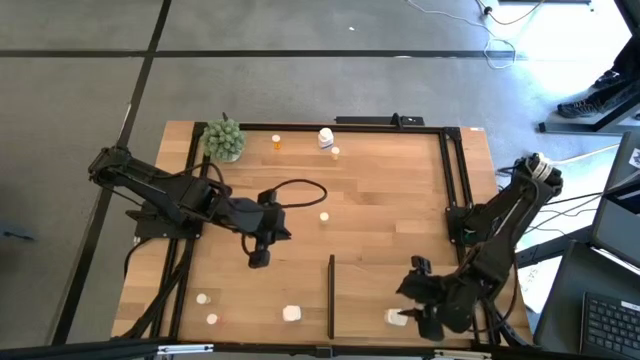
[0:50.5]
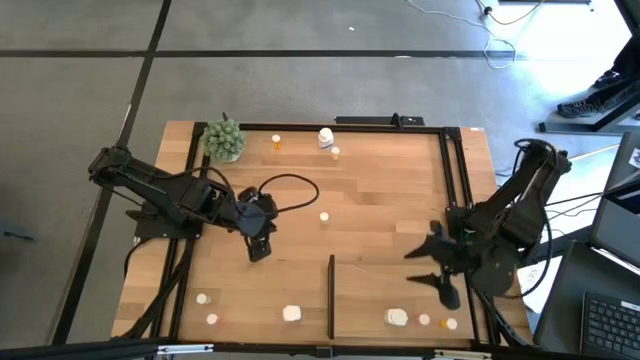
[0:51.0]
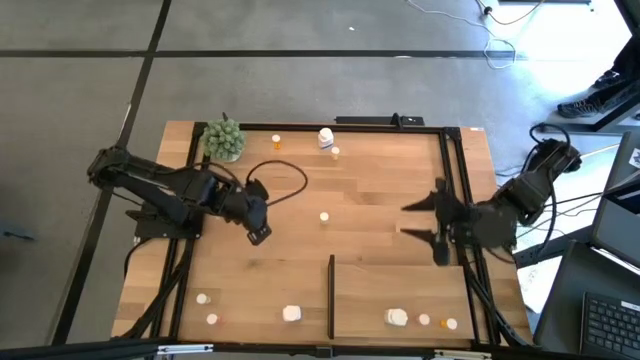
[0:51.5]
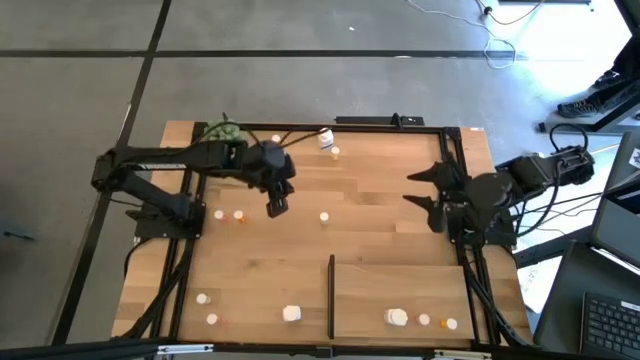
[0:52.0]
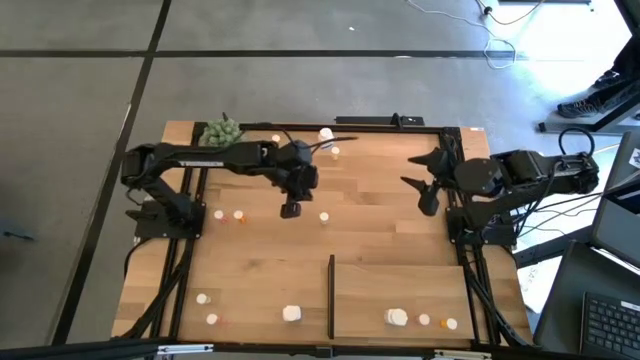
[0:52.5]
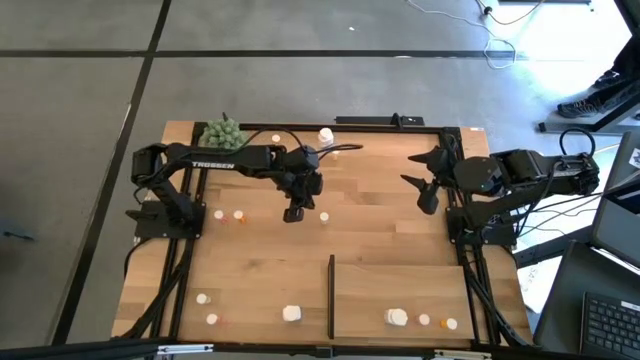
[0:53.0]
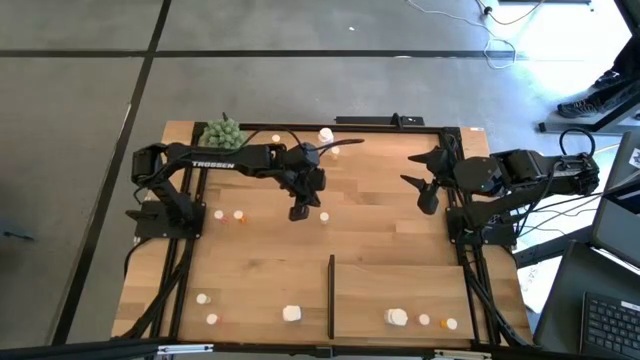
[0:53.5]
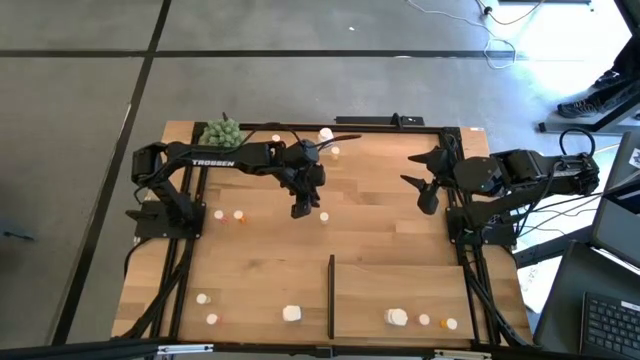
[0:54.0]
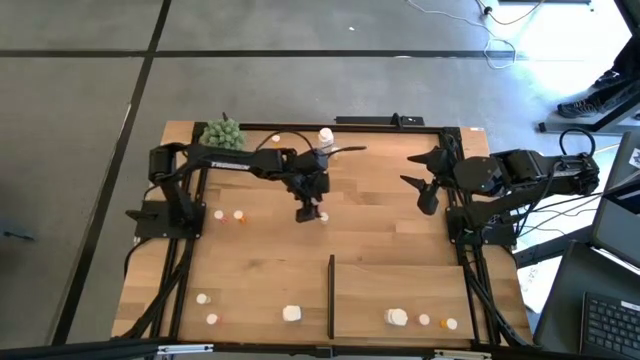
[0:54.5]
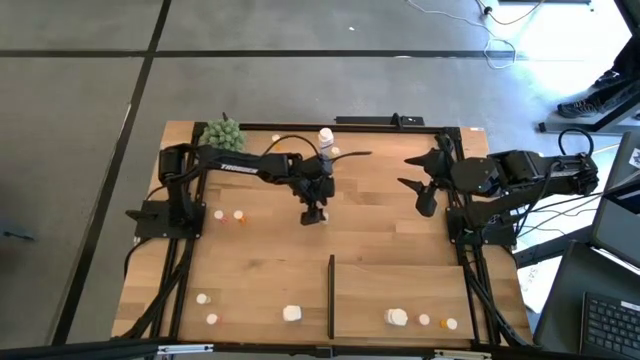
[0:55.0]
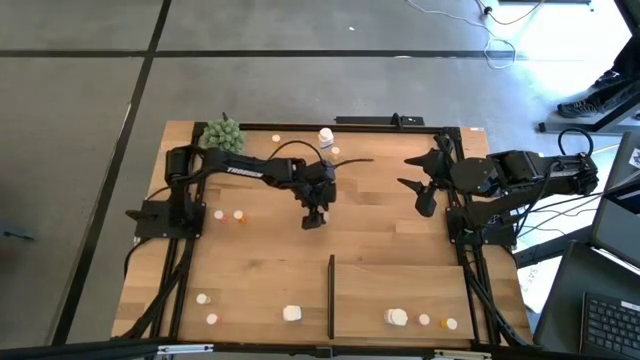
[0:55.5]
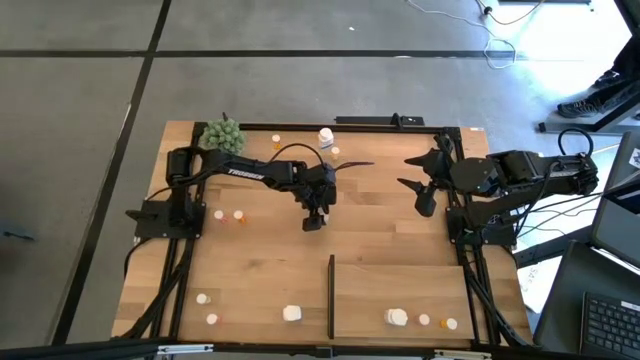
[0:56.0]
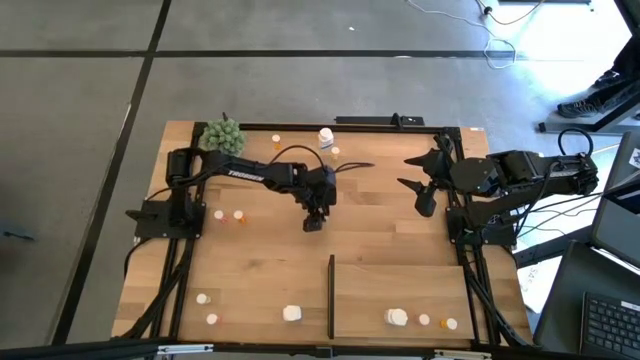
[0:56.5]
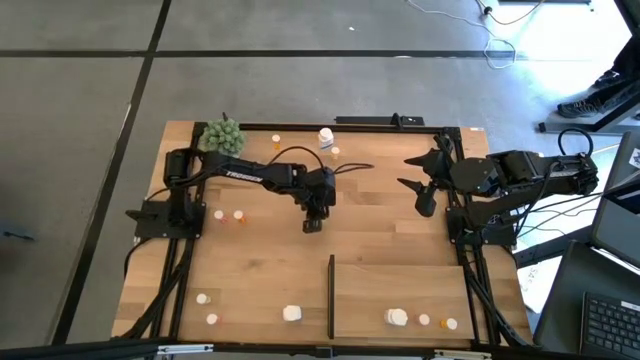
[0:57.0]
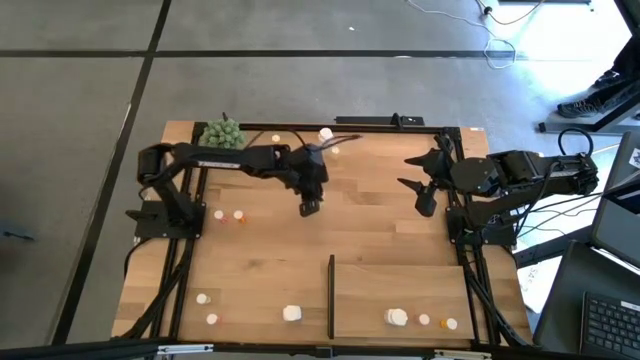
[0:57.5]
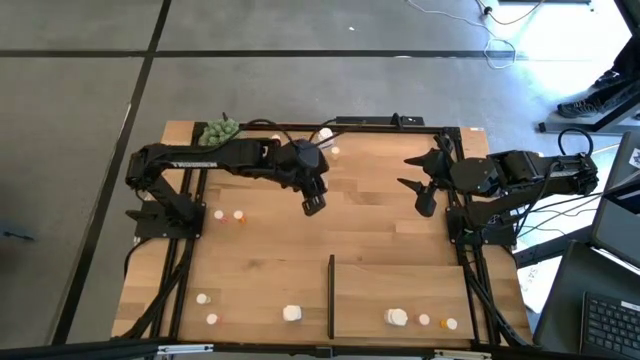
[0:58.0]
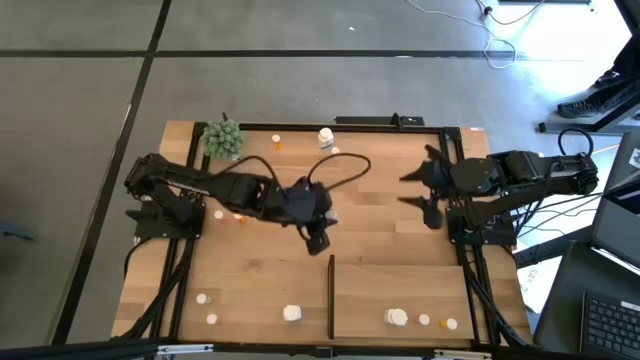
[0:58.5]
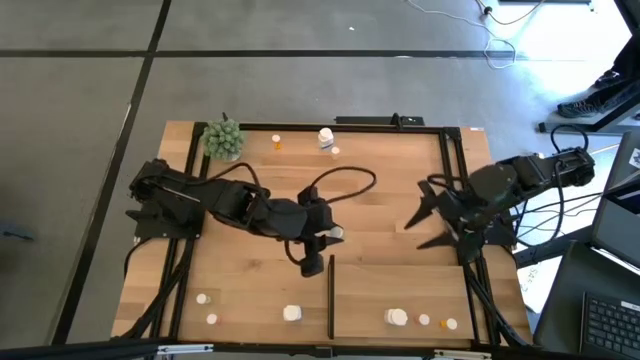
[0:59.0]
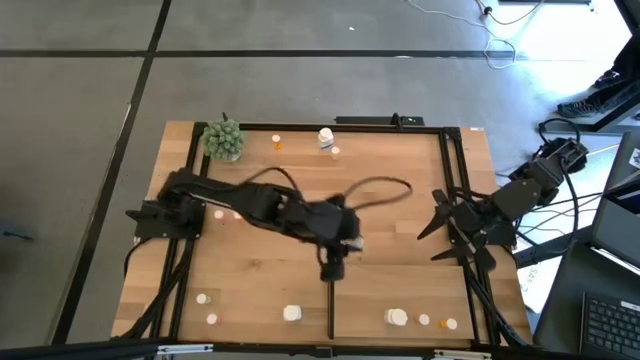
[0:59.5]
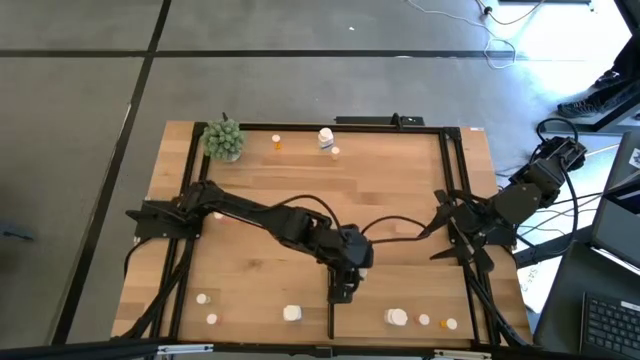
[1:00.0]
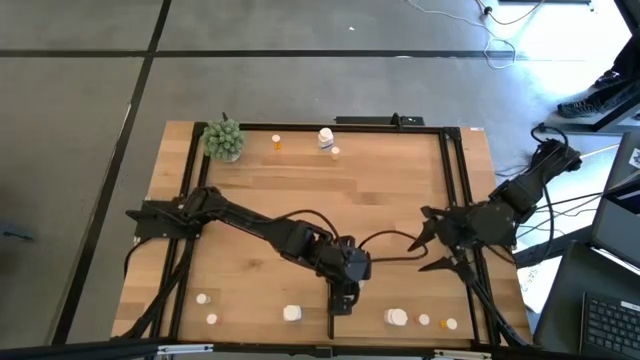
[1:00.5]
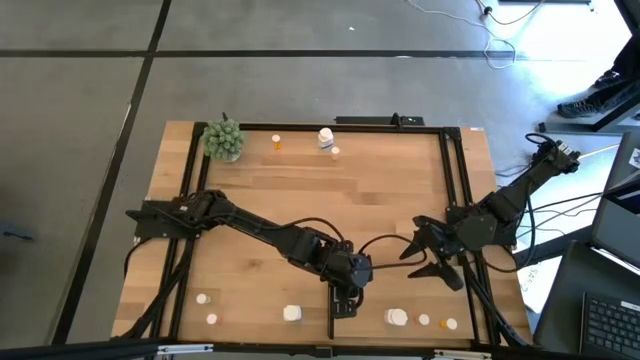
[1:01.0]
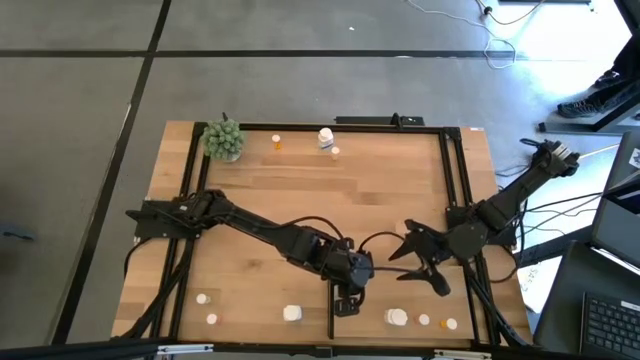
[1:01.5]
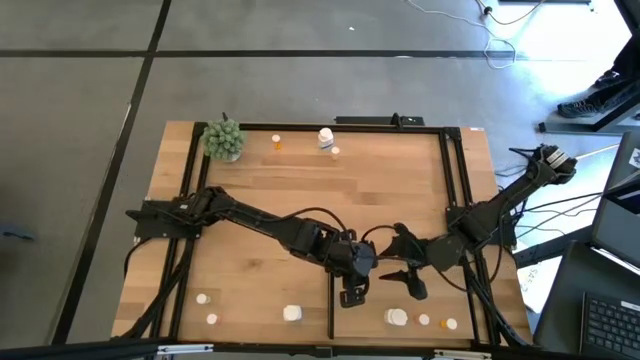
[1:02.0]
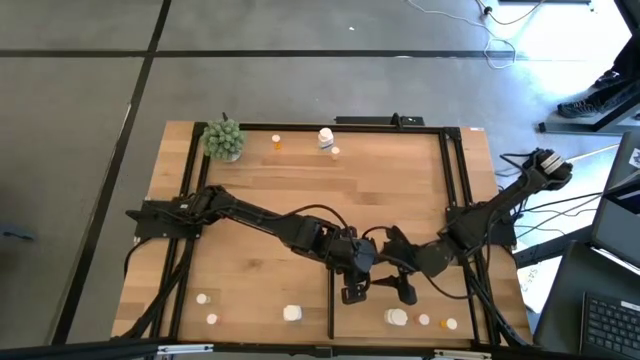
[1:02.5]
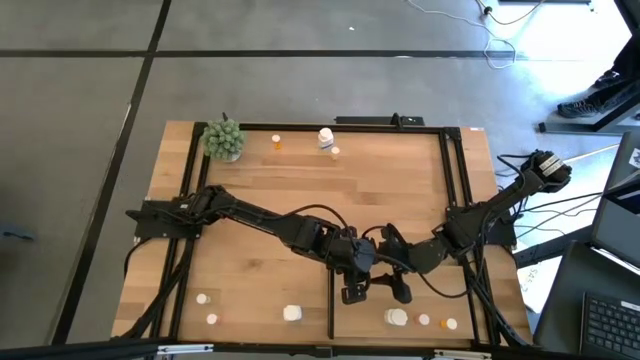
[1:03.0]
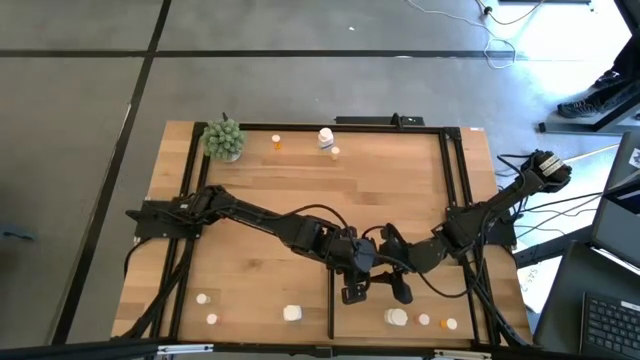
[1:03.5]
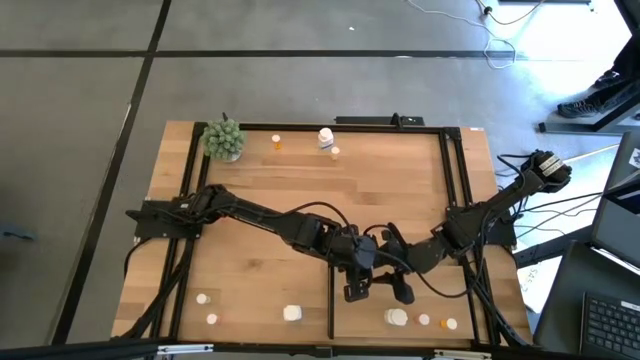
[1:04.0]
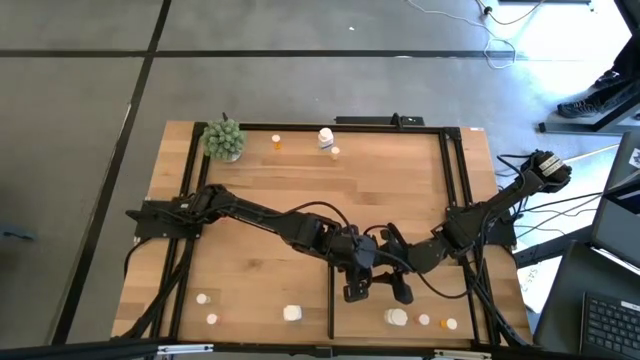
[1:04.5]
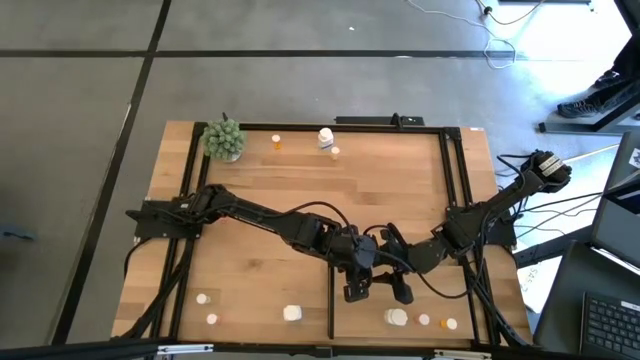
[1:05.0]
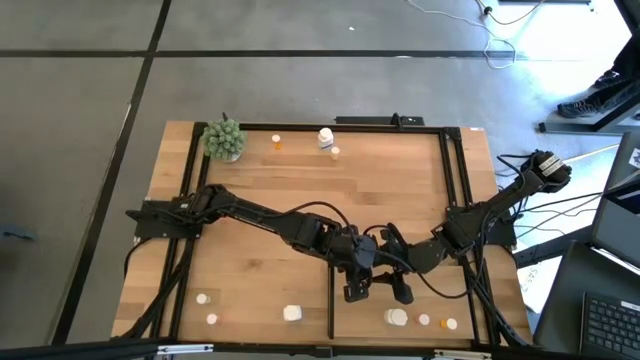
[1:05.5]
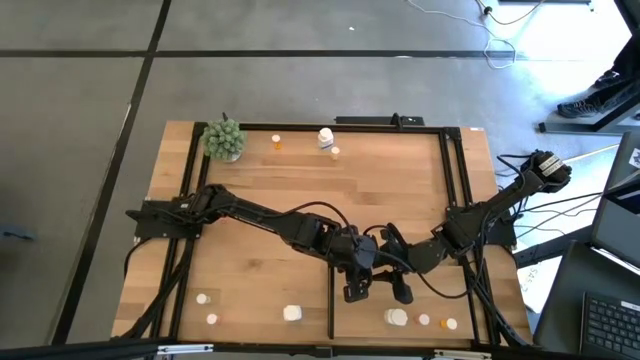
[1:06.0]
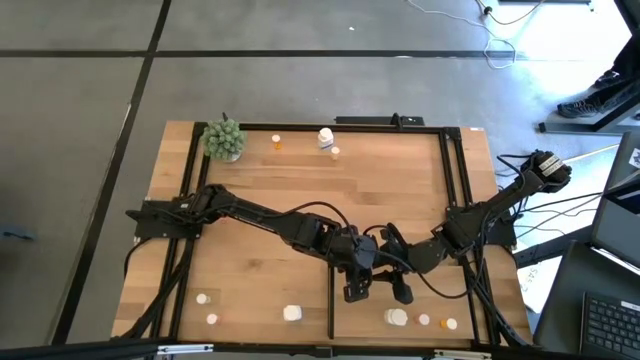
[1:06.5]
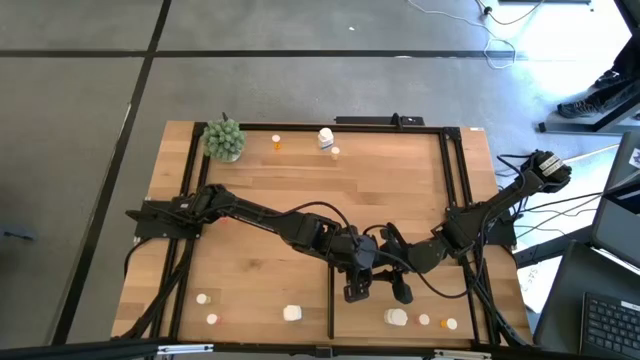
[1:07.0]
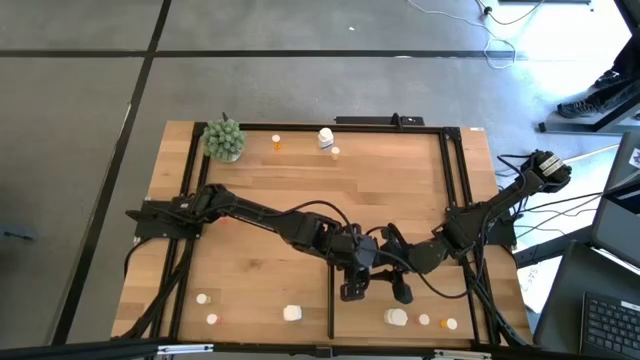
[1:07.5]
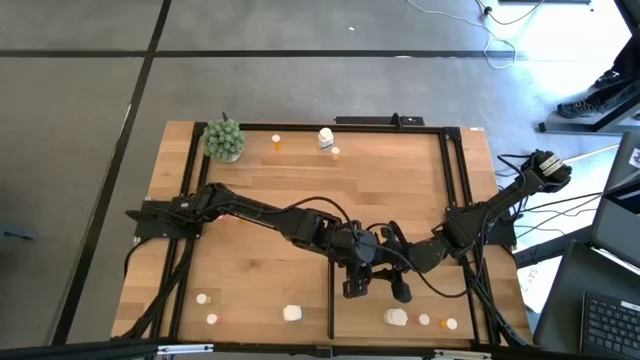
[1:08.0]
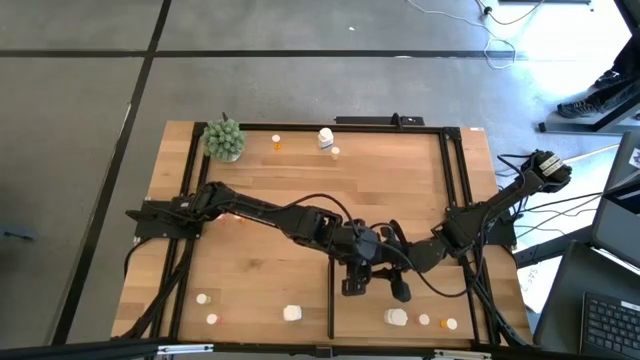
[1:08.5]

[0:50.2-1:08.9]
Task: Pick and place medicine bottles onto shelf by color
Put the middle yellow pill bottle on the shelf

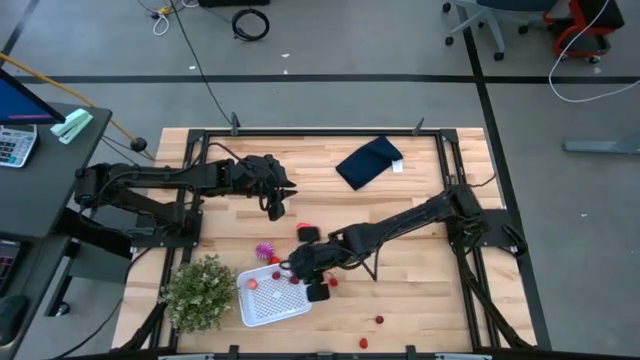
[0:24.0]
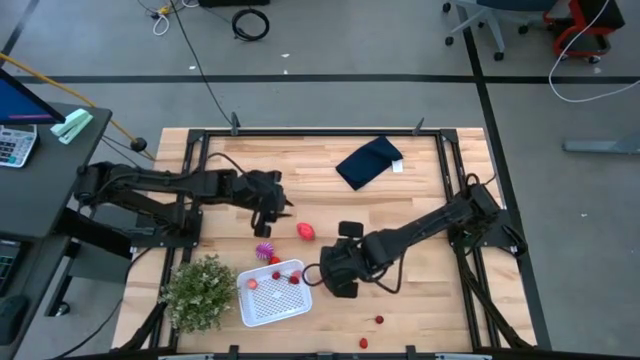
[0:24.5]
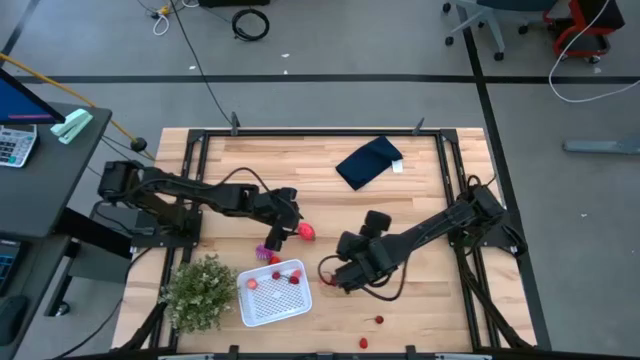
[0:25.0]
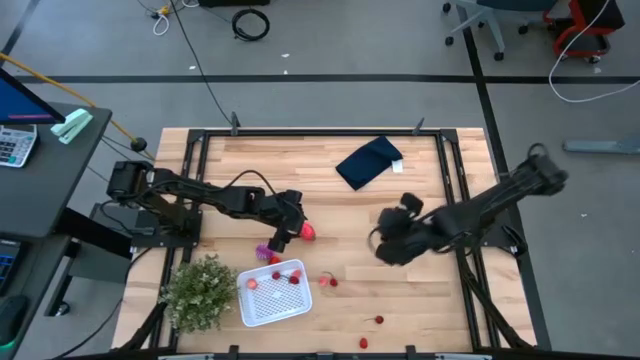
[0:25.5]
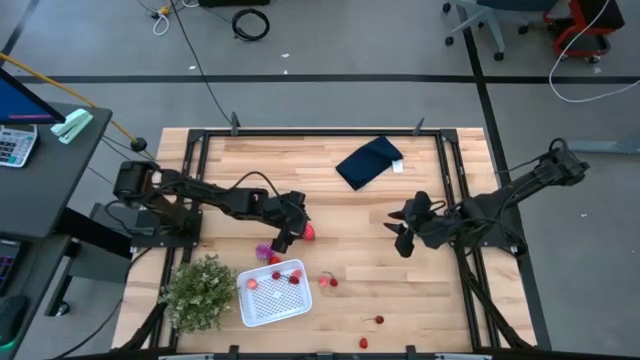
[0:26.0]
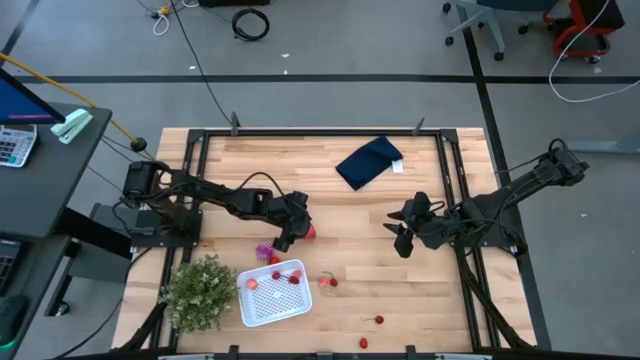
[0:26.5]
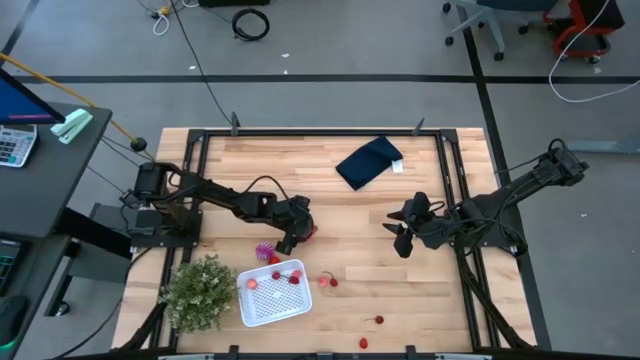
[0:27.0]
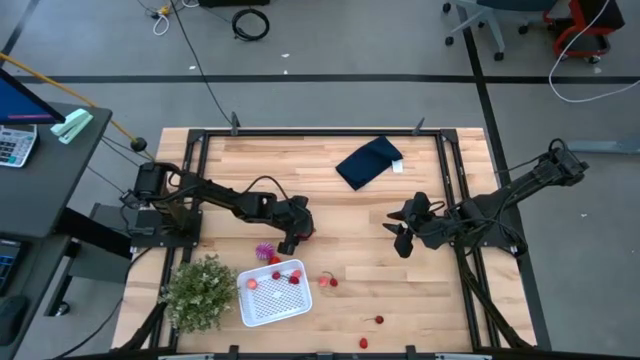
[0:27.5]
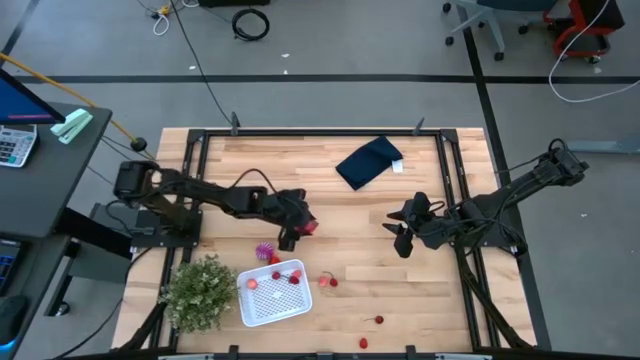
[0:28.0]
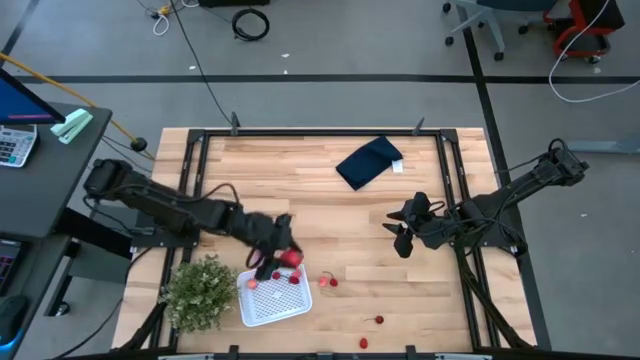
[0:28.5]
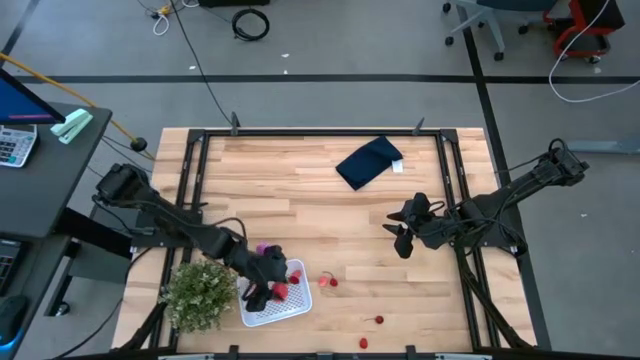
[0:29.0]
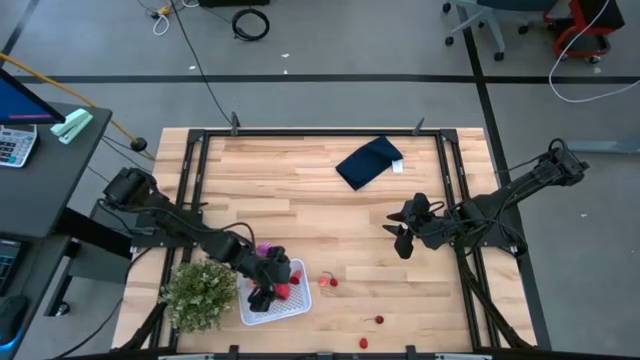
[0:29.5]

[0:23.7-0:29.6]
Task: Pick and placing Produce into tupperware
Put the dragon fruit into the white bin
